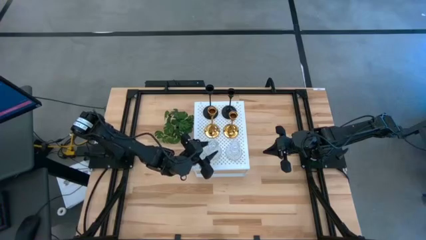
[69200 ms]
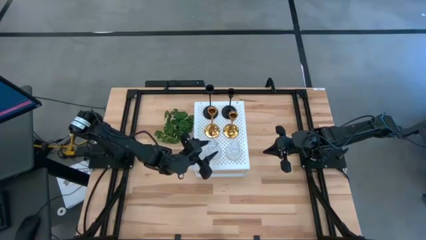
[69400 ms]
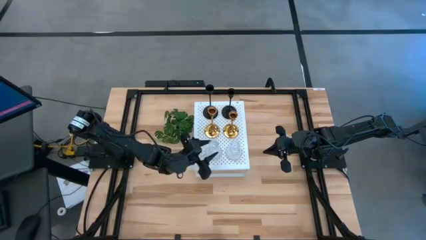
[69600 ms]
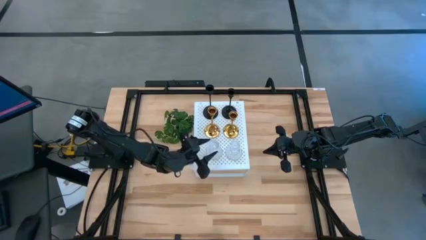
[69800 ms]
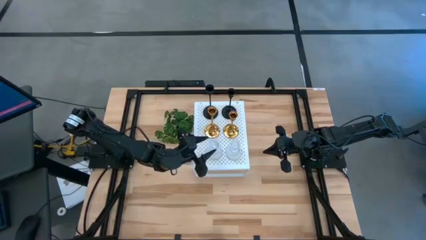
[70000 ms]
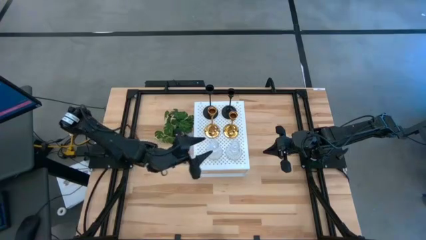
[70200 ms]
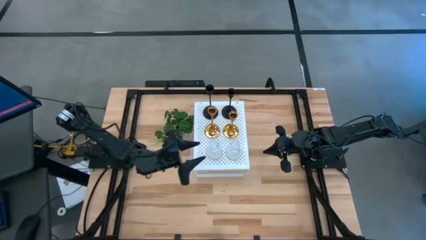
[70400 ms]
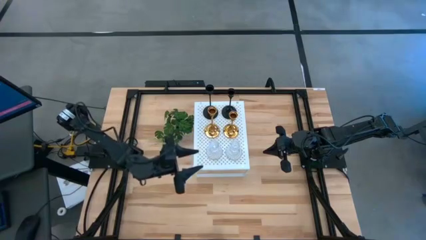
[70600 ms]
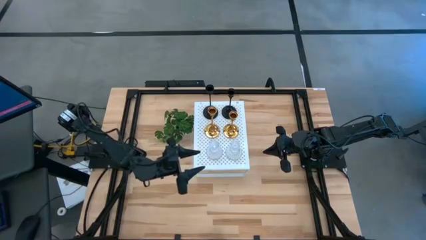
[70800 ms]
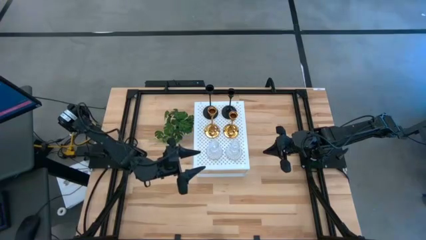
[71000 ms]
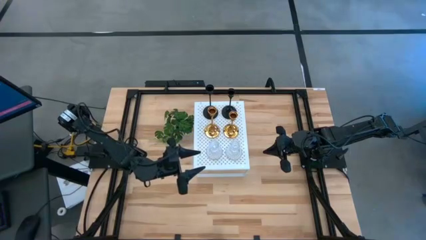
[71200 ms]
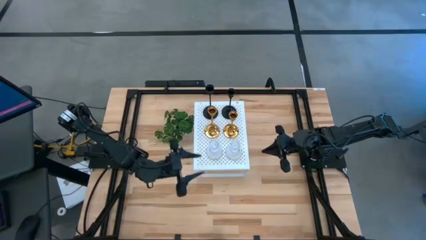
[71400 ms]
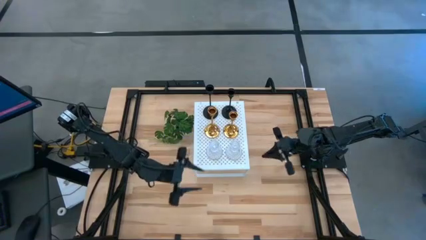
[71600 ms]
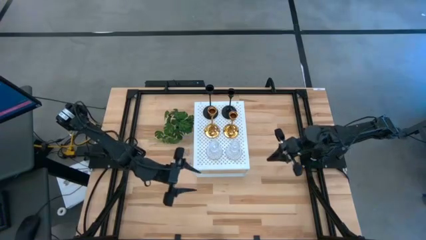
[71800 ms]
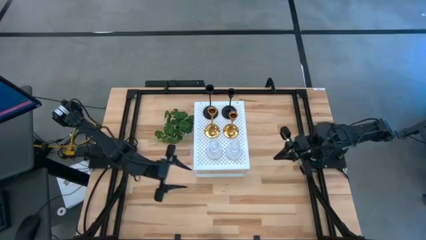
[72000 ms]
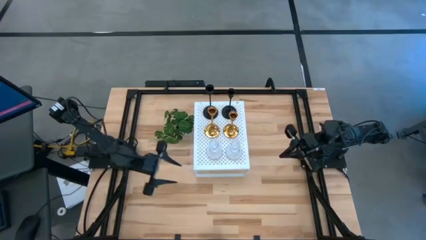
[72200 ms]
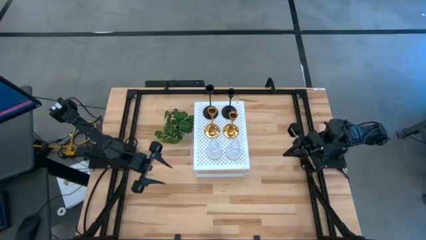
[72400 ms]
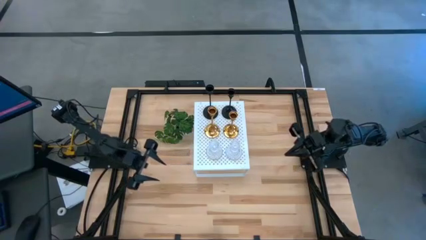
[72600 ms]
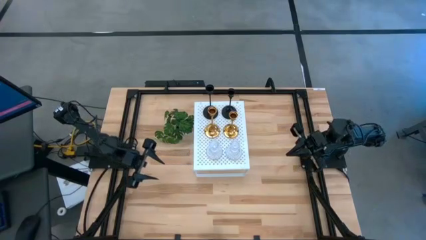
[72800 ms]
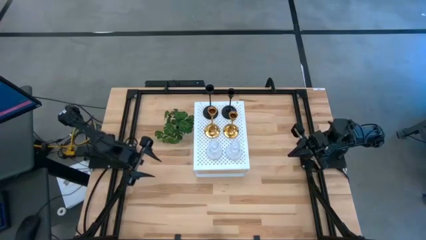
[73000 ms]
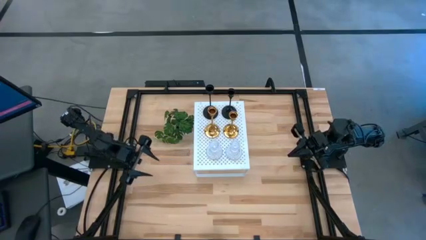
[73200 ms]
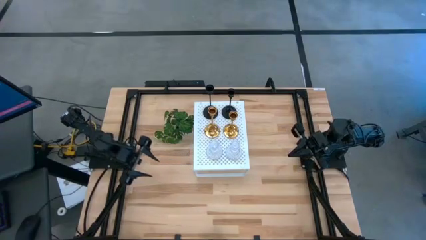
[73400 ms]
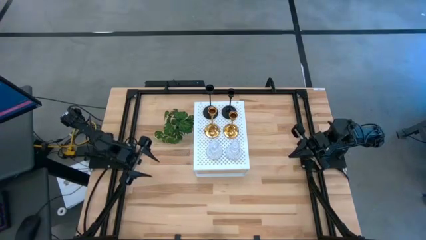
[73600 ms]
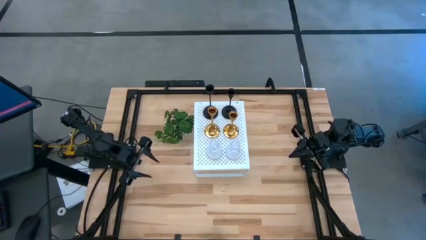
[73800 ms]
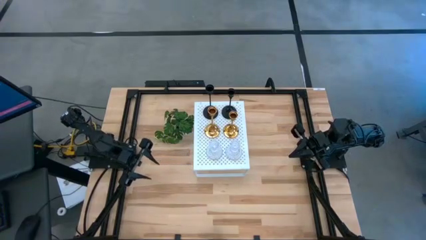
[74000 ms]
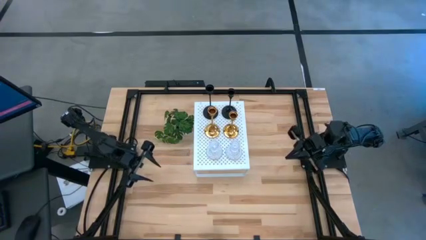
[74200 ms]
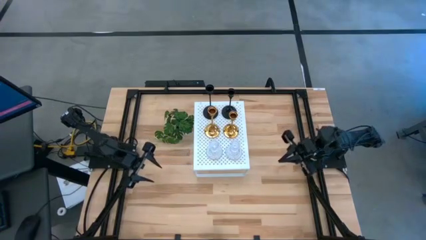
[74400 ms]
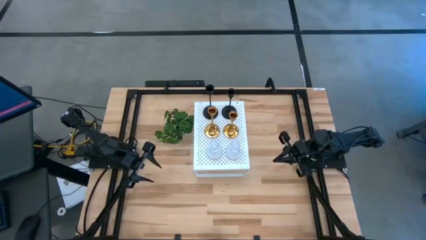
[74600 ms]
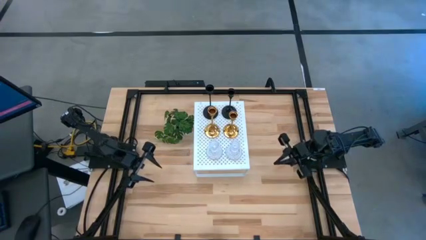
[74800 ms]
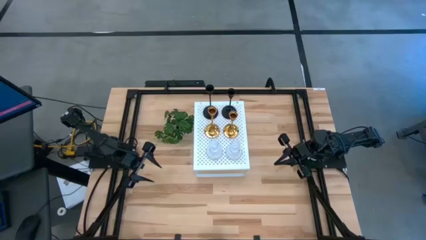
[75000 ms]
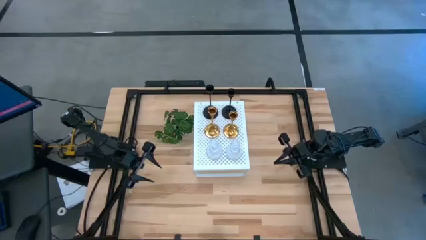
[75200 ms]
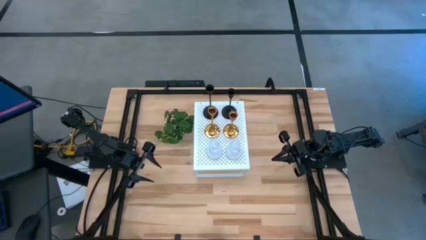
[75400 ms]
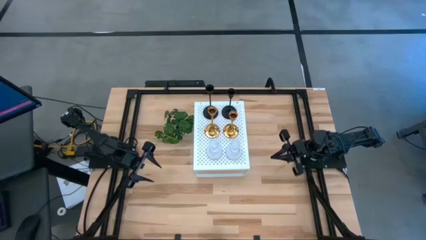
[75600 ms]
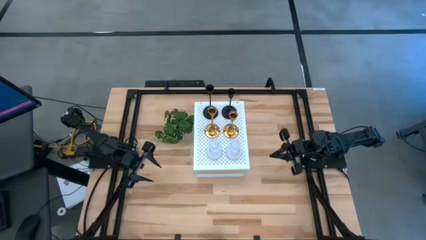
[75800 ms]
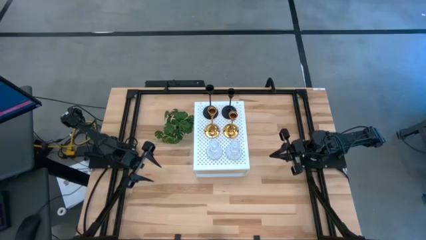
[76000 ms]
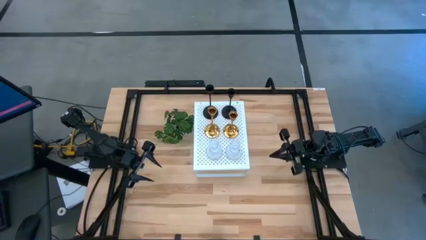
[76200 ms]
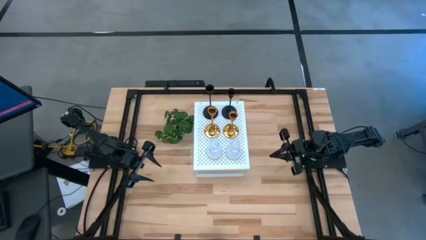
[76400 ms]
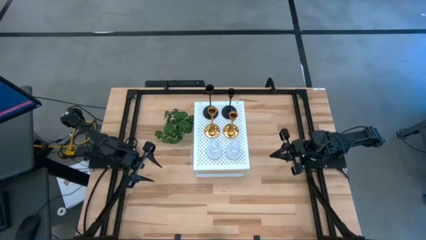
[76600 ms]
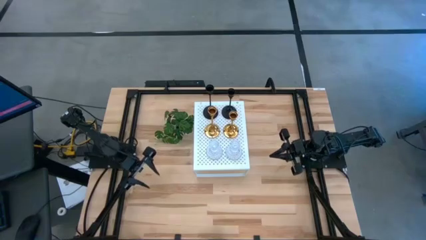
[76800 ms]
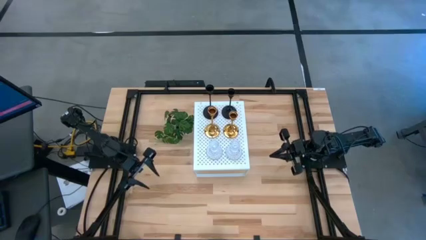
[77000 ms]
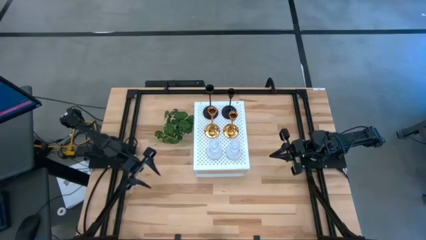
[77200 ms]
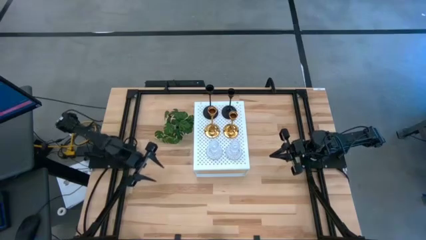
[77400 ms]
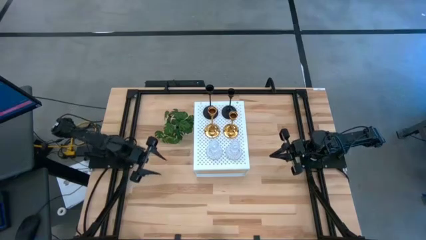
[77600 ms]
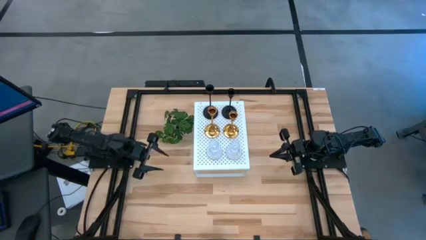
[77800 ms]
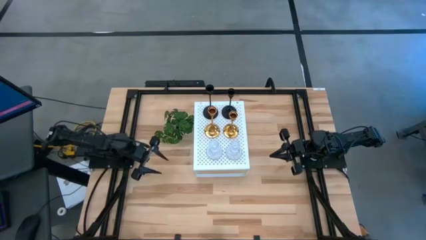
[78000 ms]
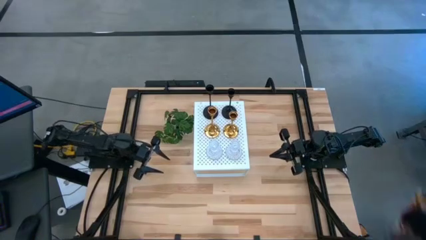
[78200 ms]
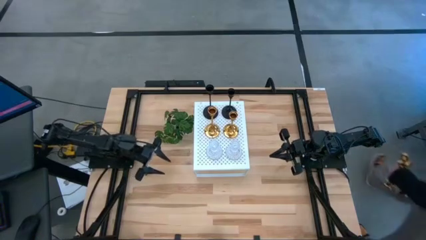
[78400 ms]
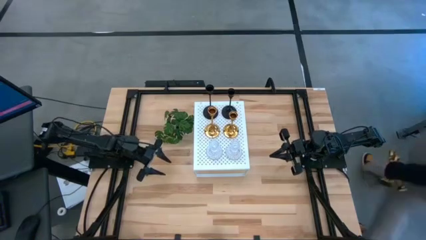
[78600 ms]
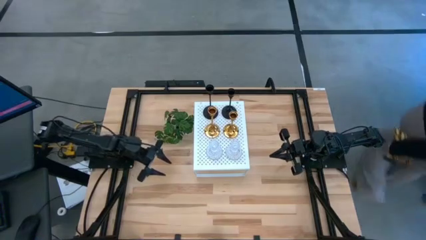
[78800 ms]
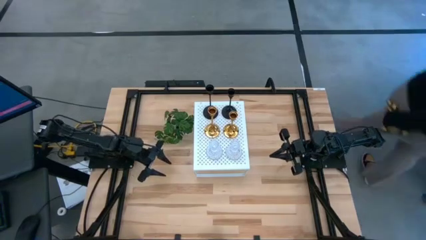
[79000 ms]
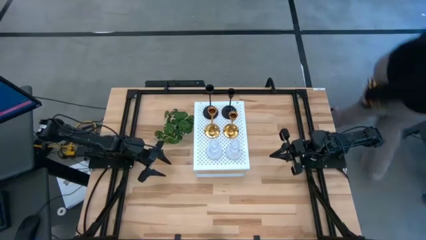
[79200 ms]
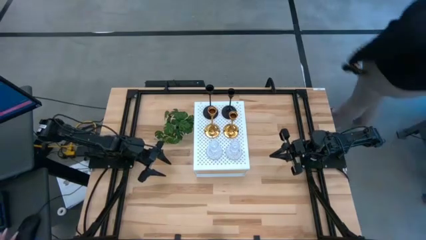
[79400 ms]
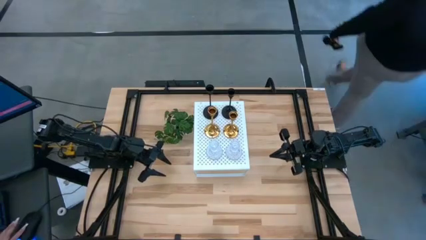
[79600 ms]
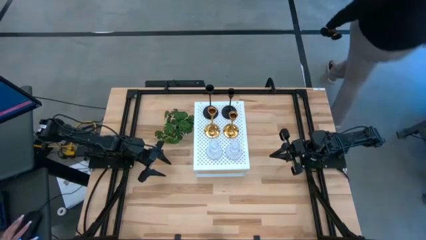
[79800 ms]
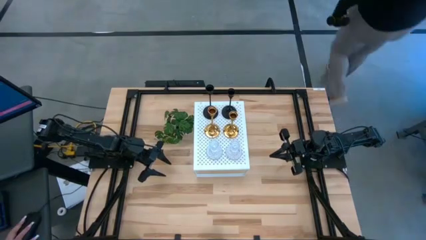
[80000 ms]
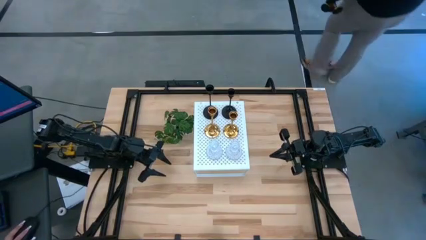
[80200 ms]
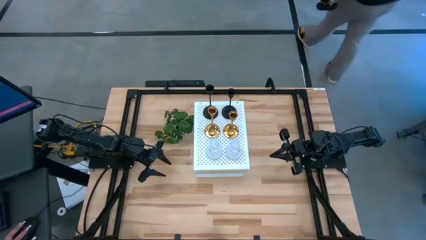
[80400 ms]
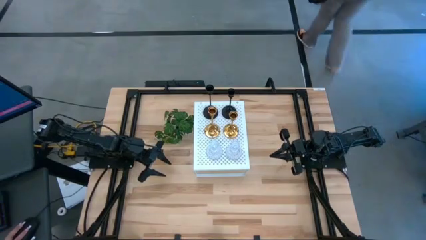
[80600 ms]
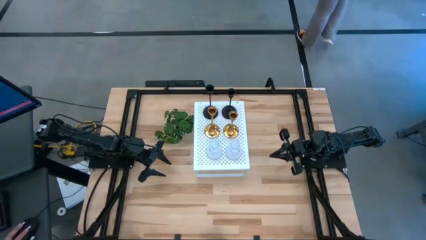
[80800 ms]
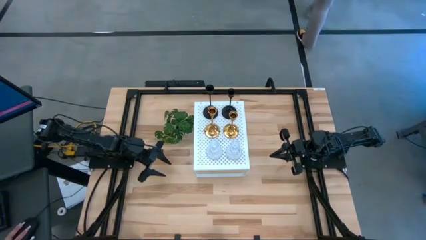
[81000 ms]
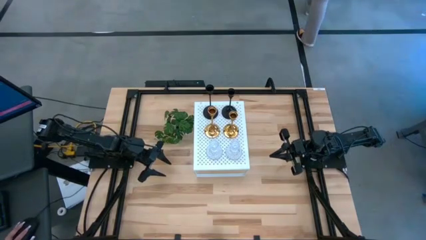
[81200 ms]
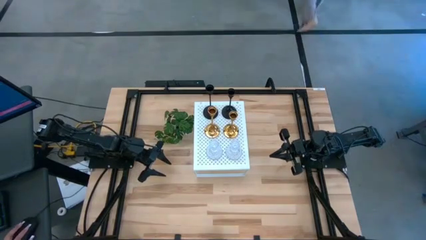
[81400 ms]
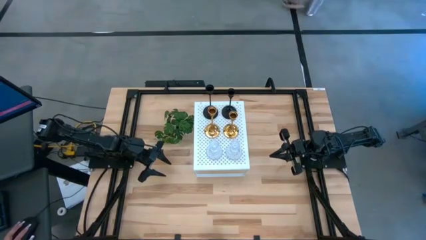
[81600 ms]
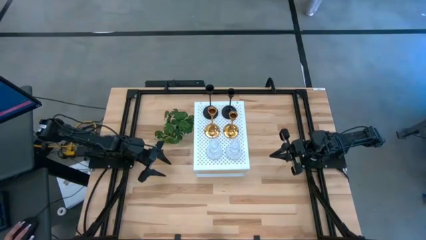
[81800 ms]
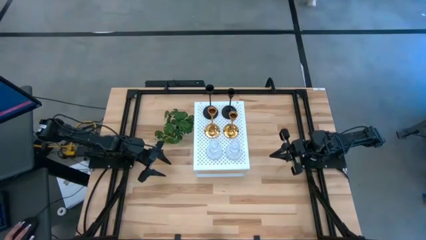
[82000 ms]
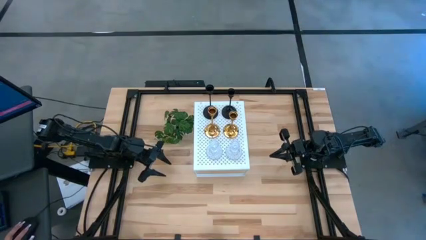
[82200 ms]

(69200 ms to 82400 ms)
Task: Pick & Place candle stick holders
Return to Home Position
